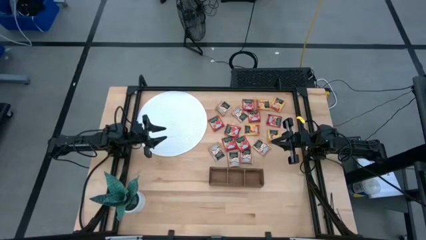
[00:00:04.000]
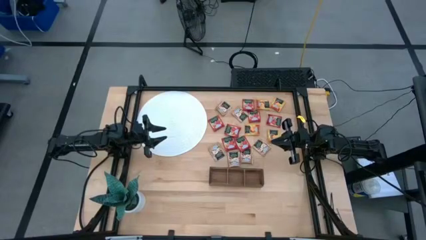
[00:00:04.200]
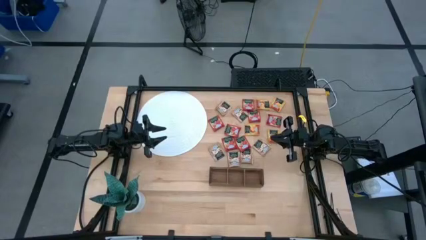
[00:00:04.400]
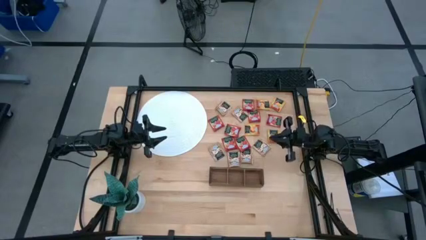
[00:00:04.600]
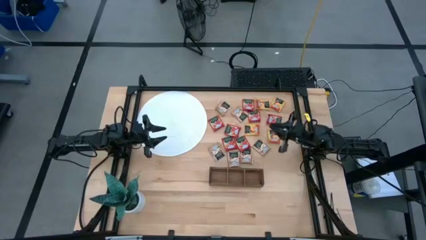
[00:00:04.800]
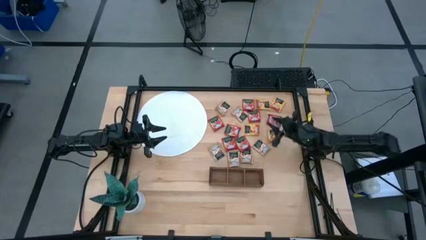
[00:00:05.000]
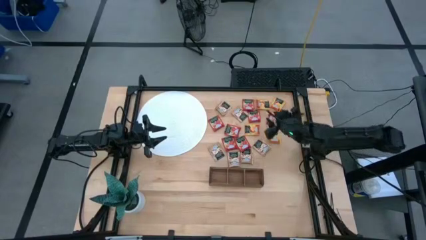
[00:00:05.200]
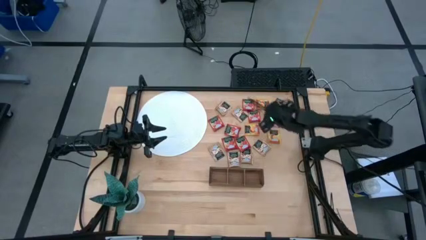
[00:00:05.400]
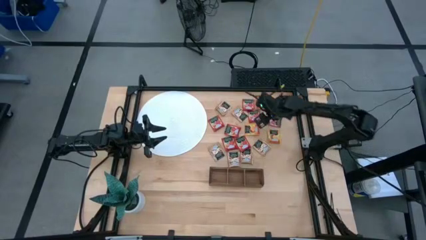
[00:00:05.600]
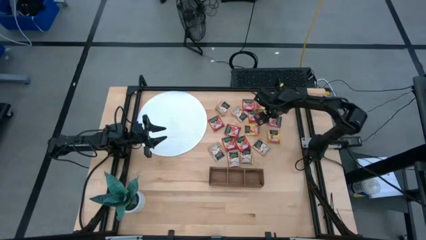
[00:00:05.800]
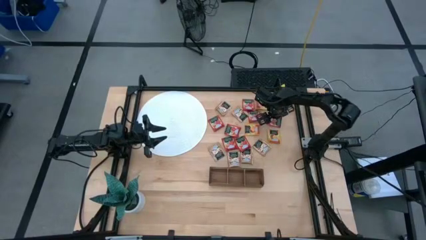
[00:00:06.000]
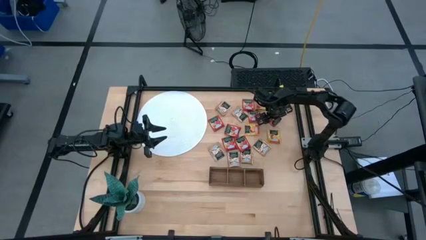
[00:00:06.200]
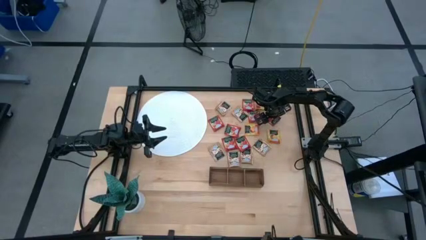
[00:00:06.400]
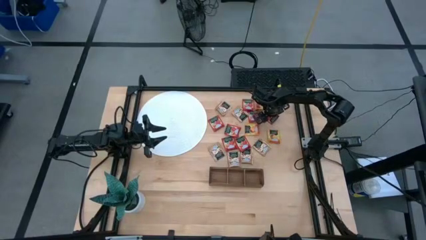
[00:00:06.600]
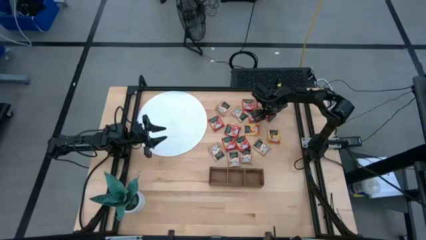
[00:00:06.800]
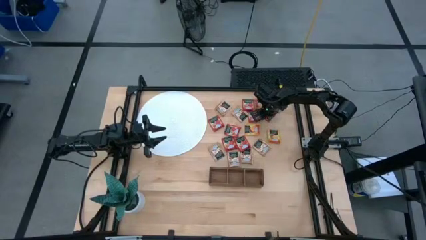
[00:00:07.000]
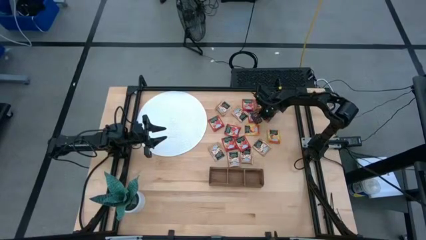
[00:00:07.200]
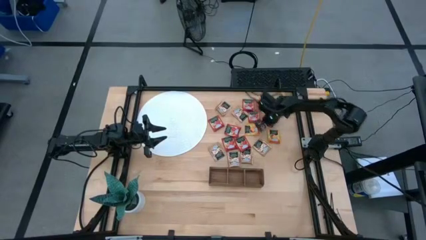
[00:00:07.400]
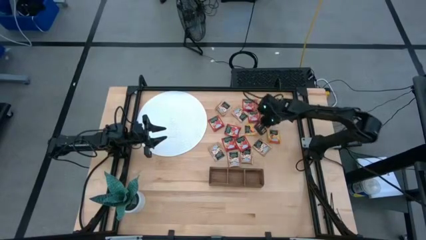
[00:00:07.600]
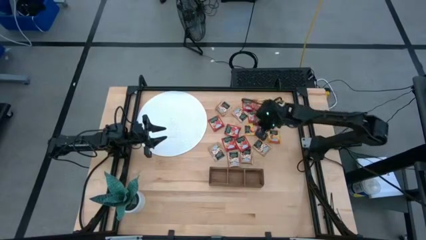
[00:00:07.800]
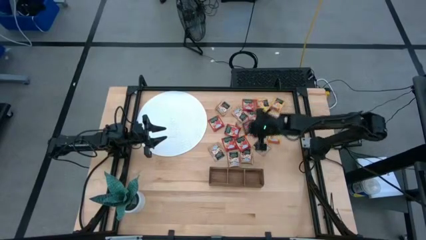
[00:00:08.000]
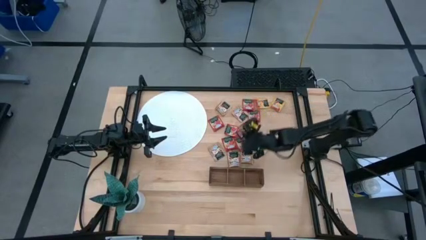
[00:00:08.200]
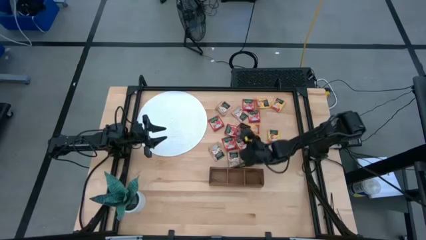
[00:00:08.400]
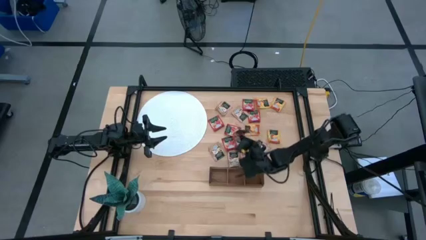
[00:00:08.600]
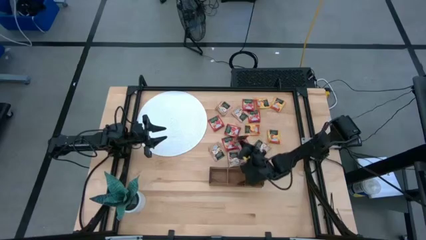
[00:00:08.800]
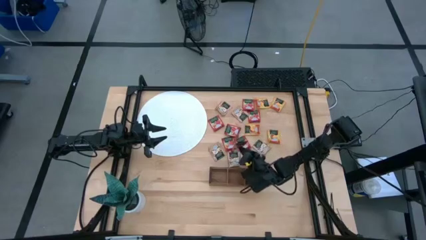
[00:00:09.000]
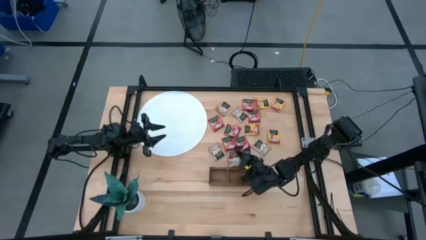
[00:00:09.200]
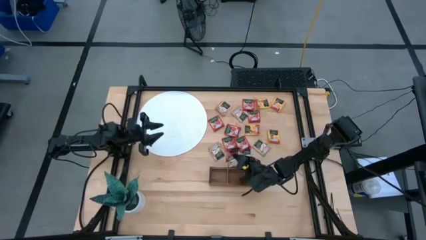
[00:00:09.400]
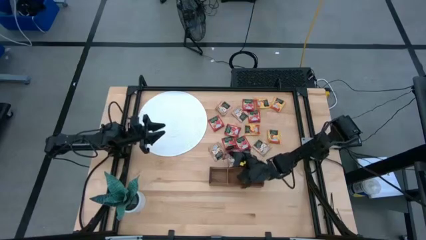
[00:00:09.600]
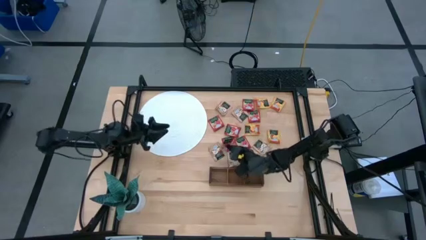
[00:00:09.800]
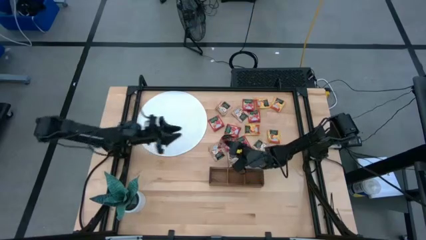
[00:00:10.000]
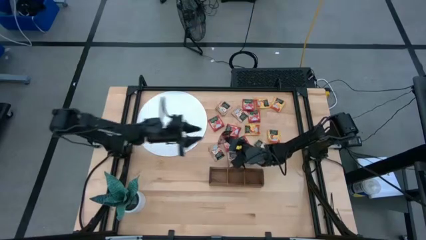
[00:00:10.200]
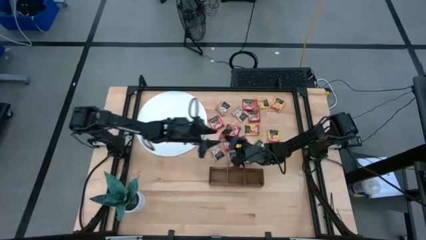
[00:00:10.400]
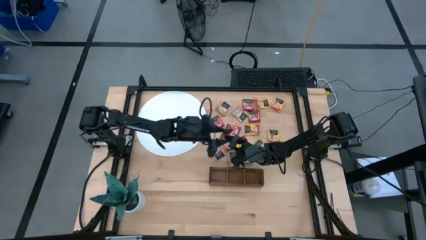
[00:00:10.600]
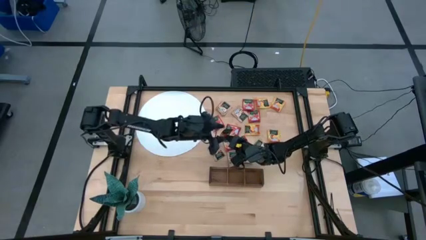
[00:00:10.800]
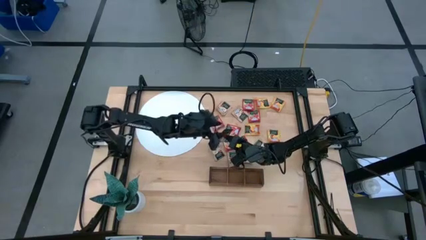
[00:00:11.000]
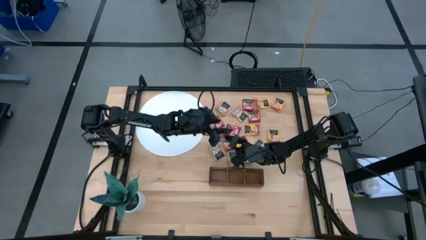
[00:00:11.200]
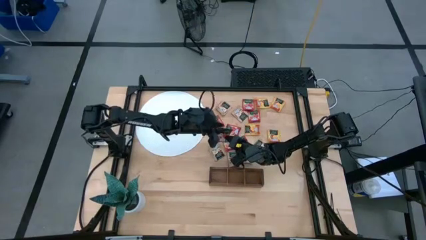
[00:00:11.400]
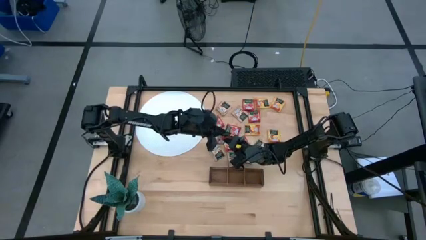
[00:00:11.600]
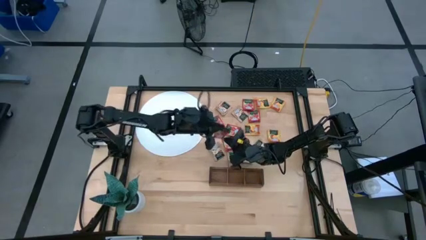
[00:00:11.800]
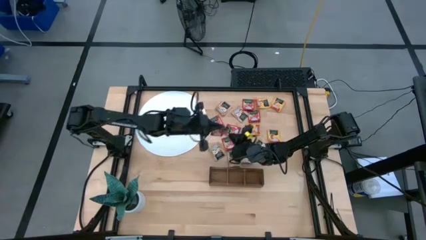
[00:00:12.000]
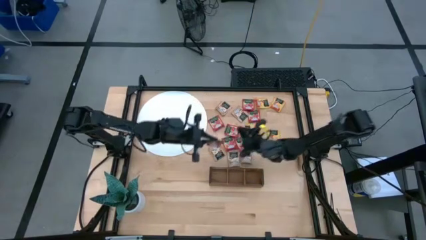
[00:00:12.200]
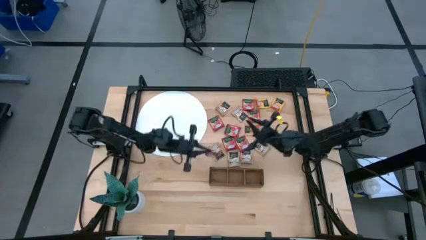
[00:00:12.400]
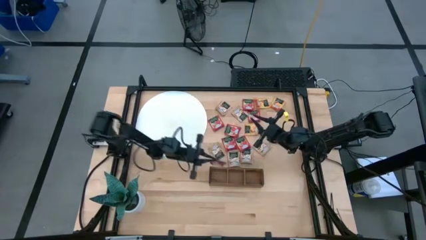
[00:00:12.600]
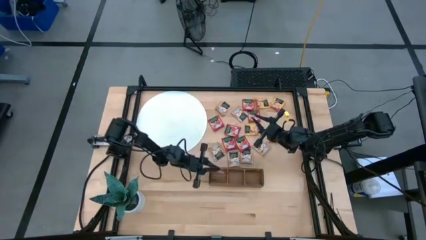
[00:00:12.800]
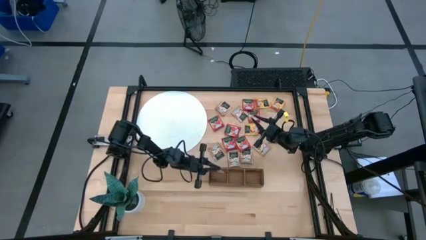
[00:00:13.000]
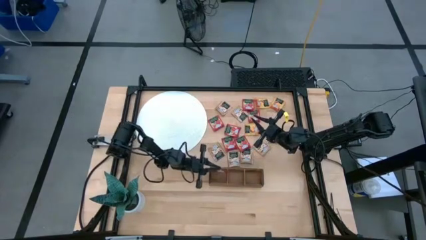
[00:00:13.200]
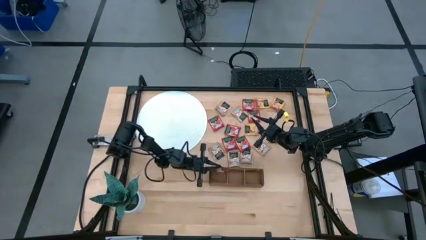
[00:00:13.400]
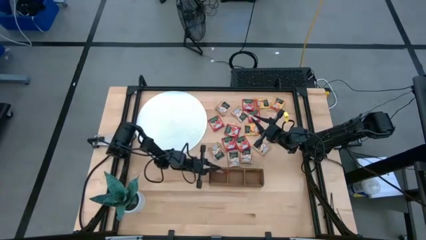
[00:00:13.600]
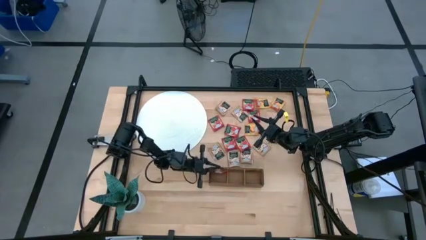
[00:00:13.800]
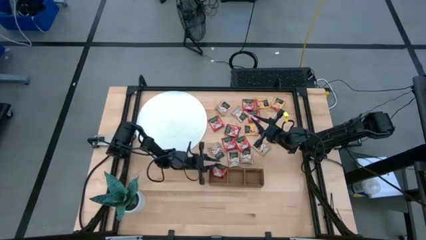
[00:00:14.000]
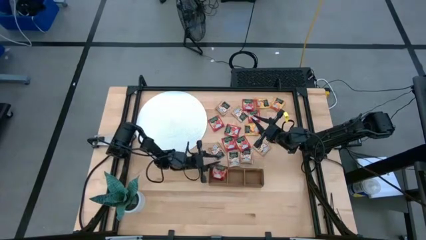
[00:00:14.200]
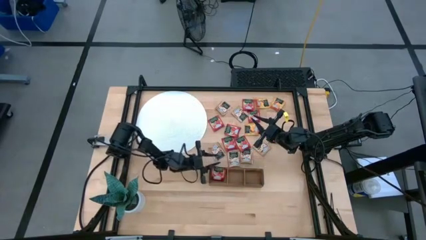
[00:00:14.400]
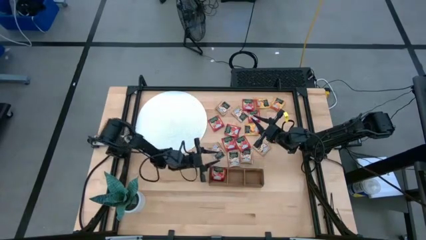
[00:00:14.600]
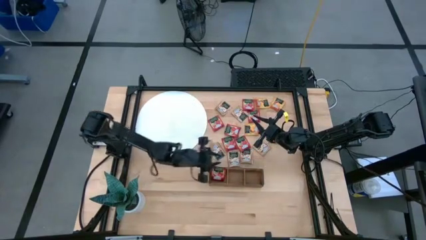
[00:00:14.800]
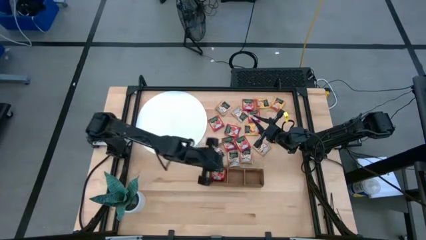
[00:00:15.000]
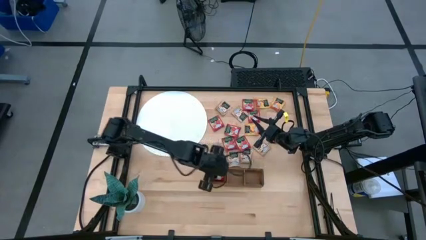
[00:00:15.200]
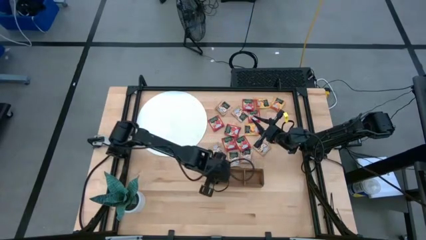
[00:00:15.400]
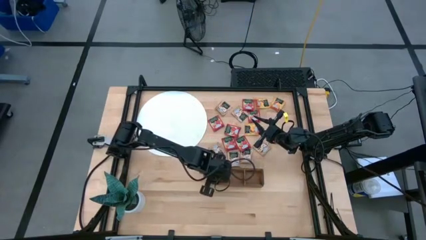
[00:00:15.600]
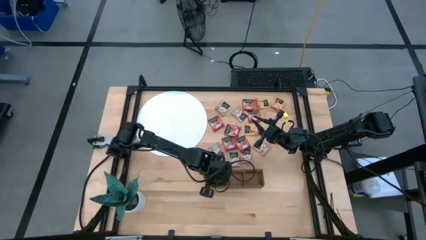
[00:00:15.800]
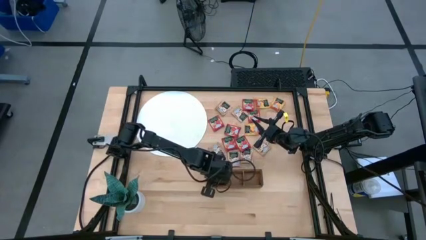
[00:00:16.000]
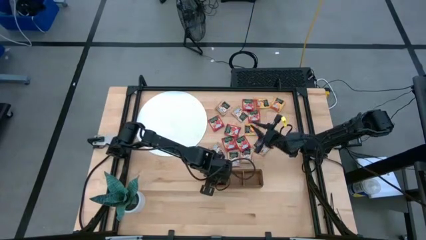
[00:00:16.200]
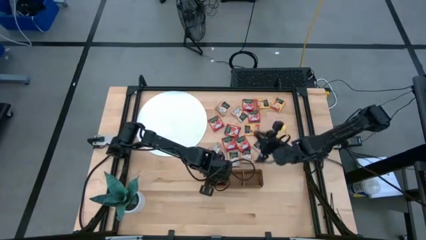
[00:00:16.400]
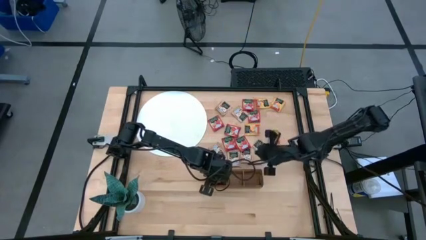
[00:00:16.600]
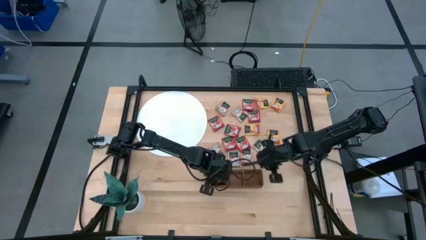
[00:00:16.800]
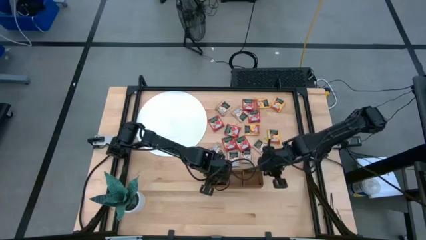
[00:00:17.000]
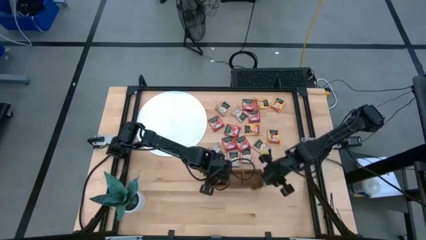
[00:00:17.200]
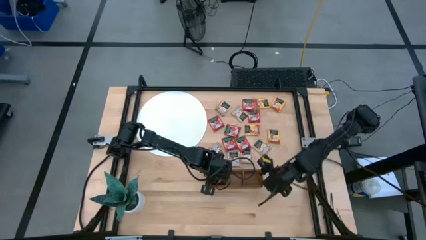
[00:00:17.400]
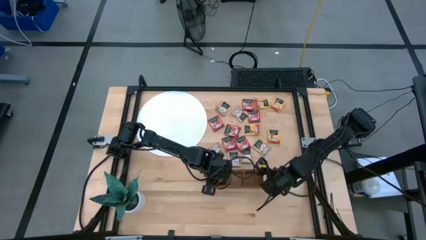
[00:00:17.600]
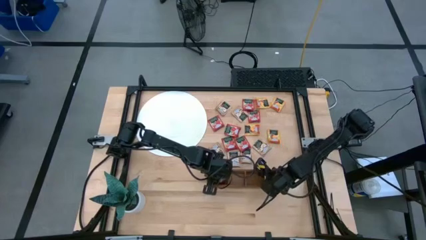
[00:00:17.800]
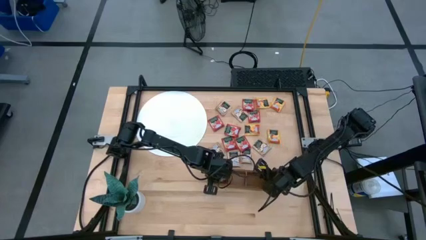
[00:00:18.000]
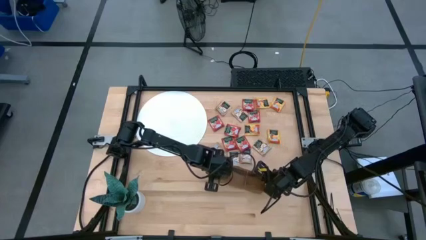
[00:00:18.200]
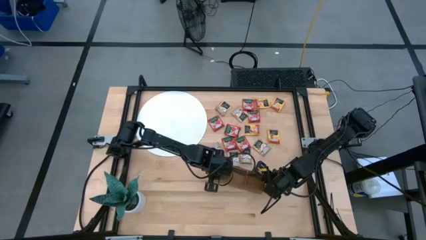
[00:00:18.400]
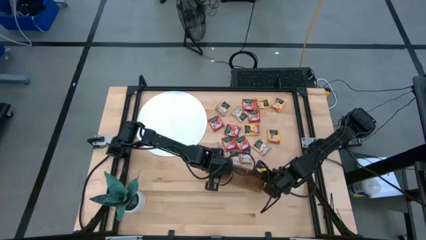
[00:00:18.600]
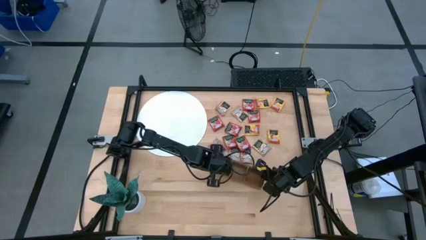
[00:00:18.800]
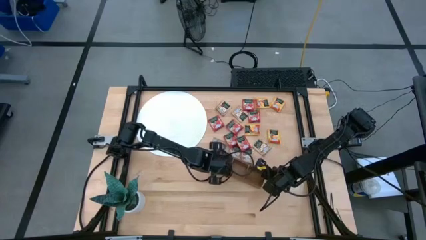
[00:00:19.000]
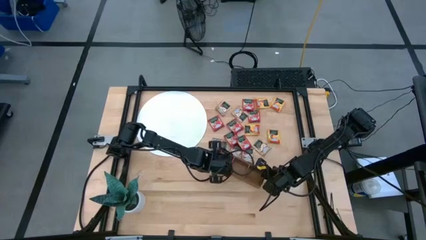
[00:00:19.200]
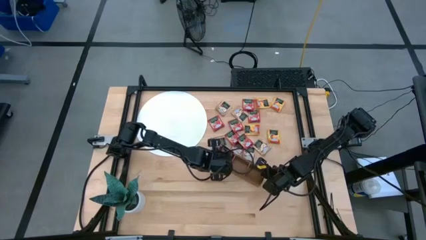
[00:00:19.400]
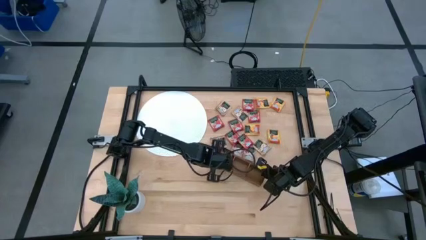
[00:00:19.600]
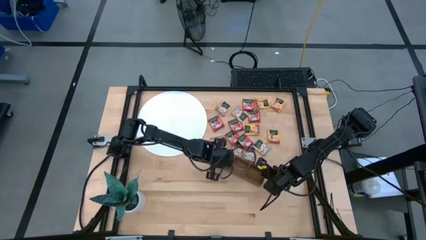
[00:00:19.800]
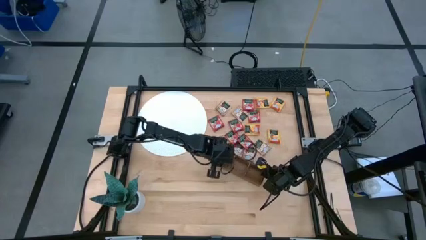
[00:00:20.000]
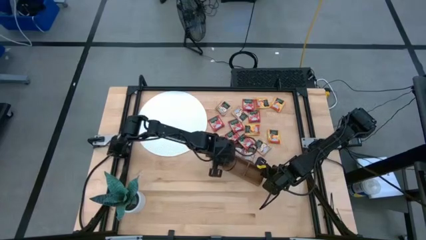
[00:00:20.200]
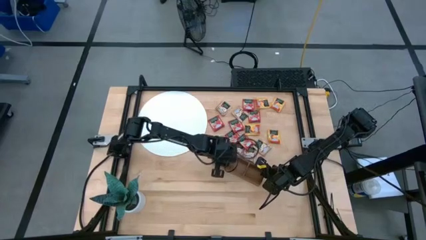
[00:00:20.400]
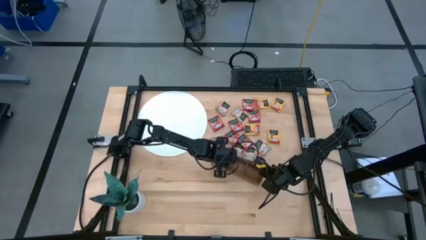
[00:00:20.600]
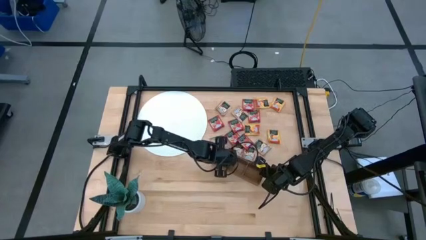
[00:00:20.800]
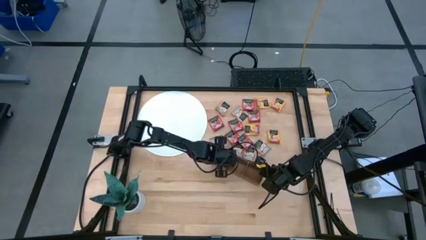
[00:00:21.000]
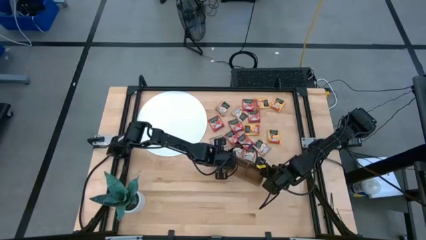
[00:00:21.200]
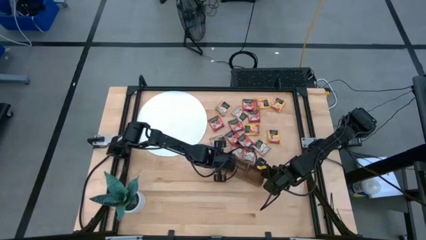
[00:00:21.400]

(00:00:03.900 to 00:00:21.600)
Task: Pick & Place Tea
Put the red tea bag into the left section of the wooden organizer
